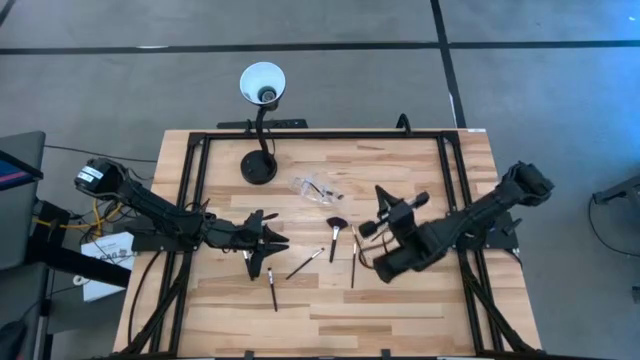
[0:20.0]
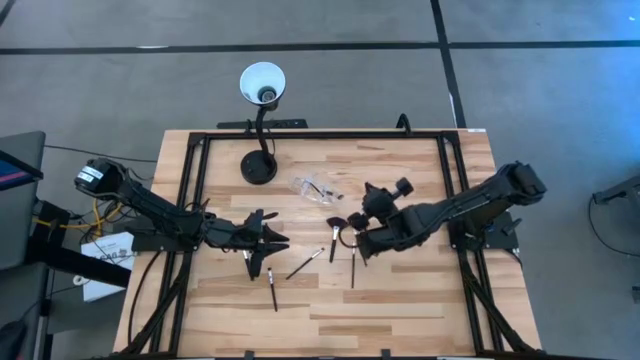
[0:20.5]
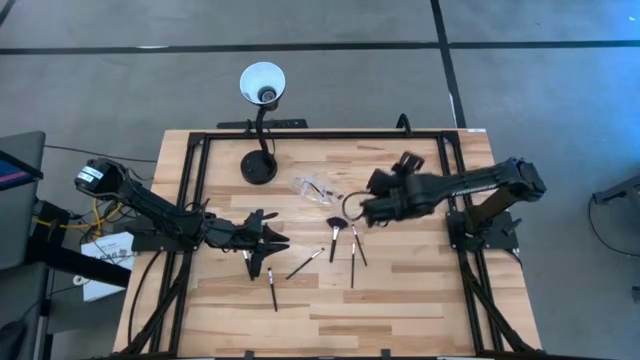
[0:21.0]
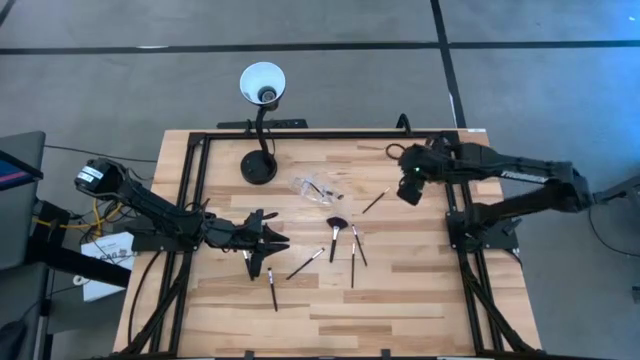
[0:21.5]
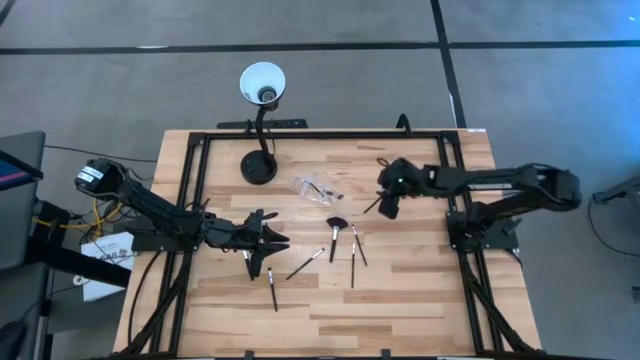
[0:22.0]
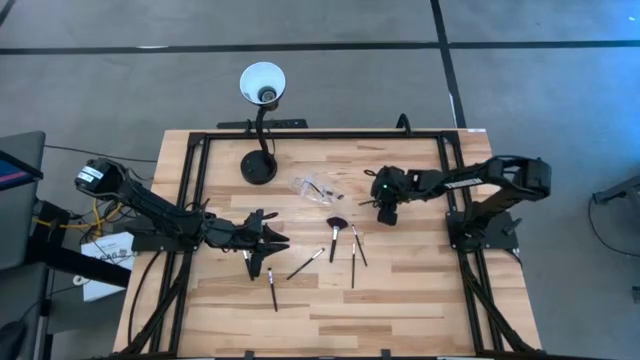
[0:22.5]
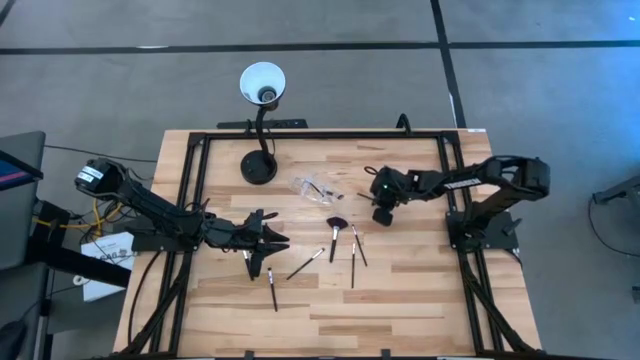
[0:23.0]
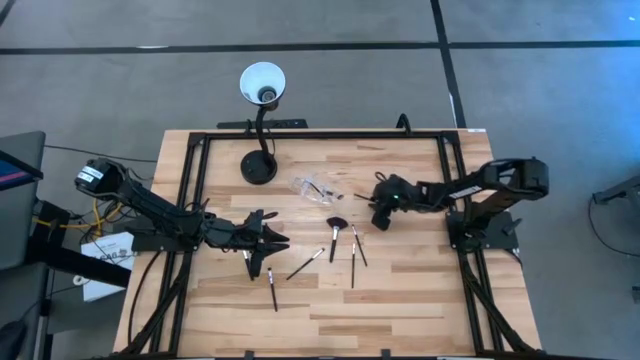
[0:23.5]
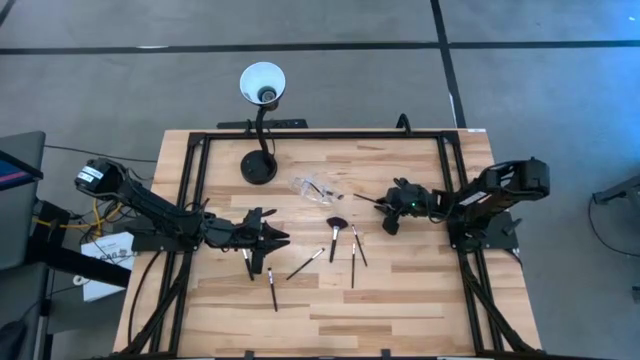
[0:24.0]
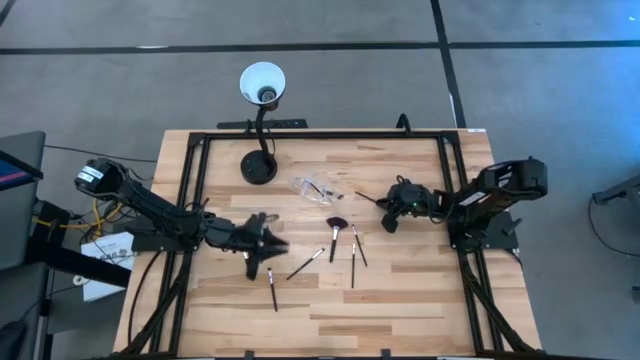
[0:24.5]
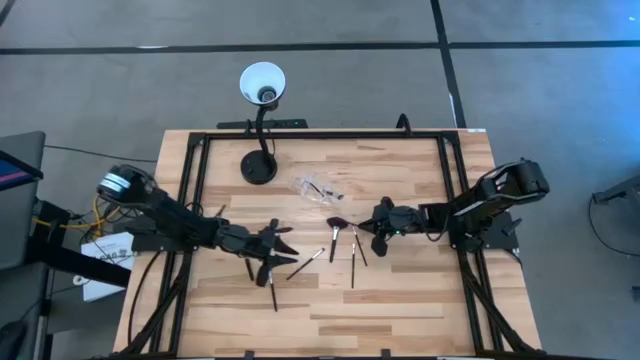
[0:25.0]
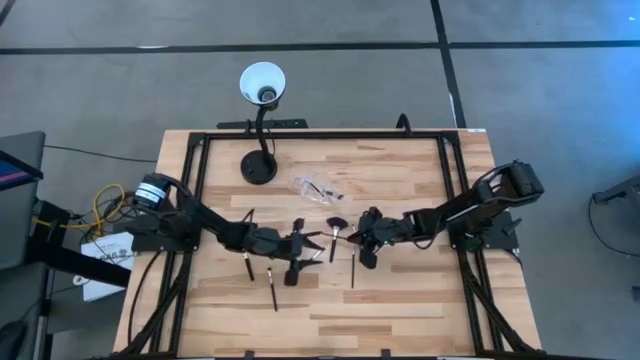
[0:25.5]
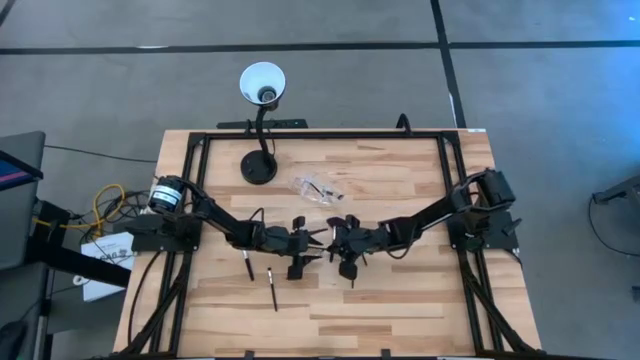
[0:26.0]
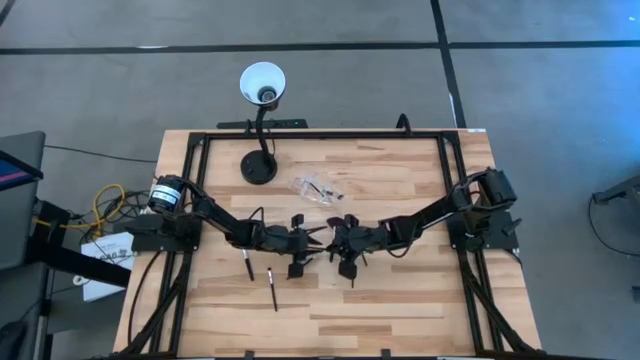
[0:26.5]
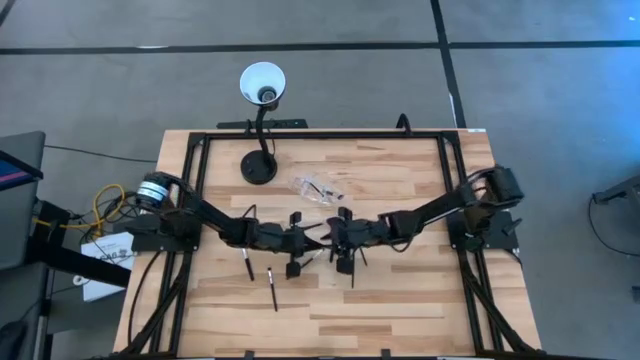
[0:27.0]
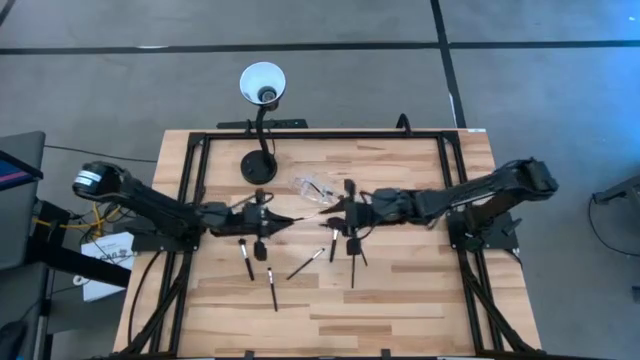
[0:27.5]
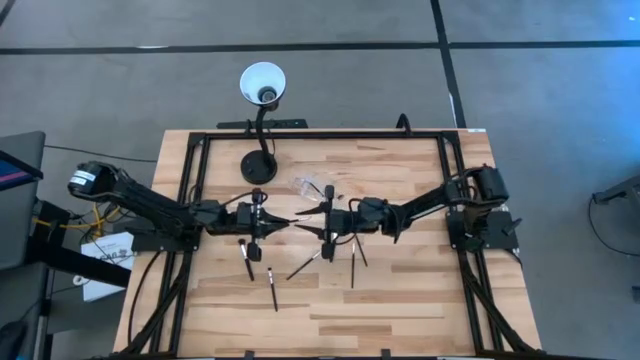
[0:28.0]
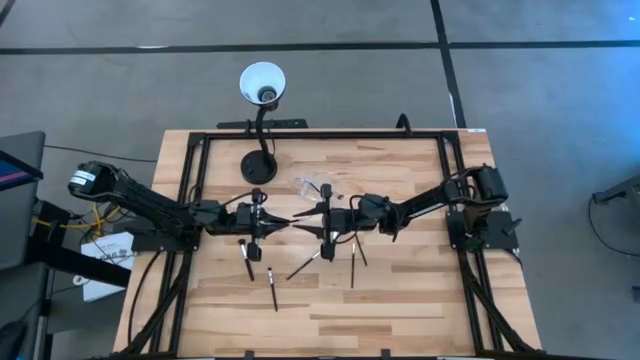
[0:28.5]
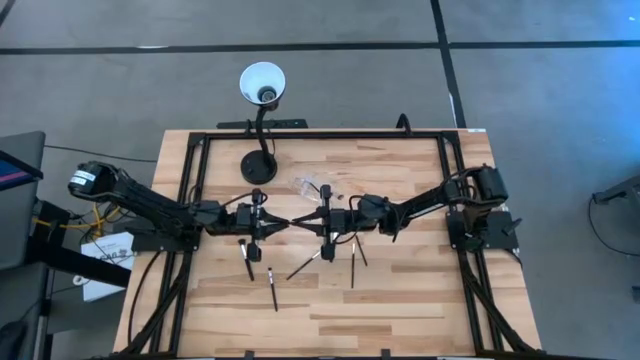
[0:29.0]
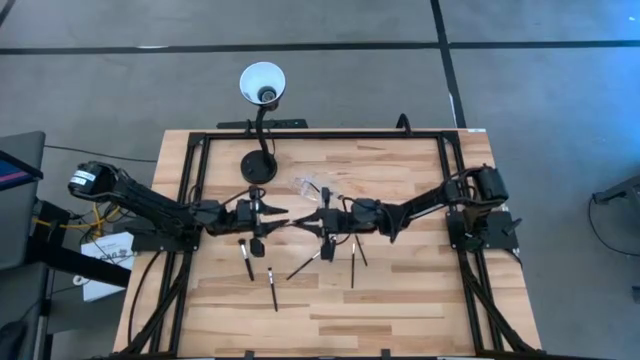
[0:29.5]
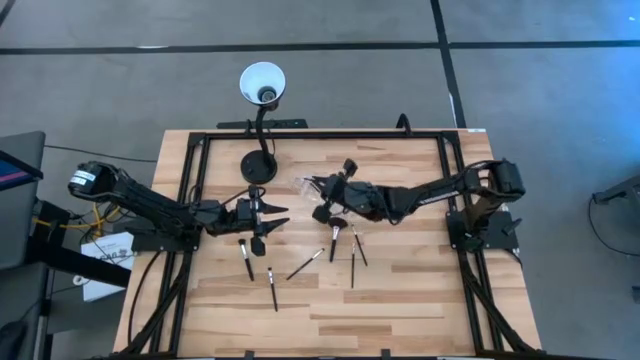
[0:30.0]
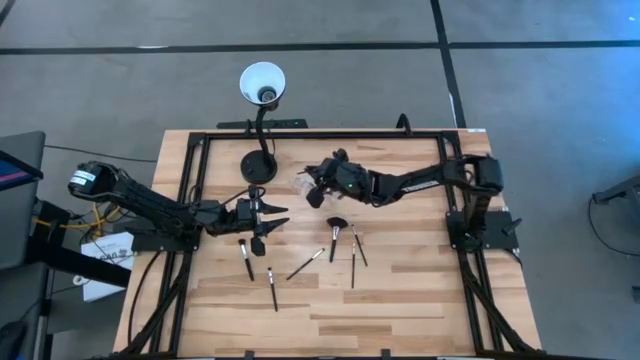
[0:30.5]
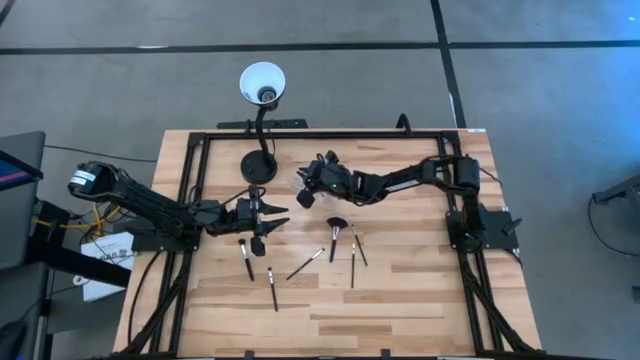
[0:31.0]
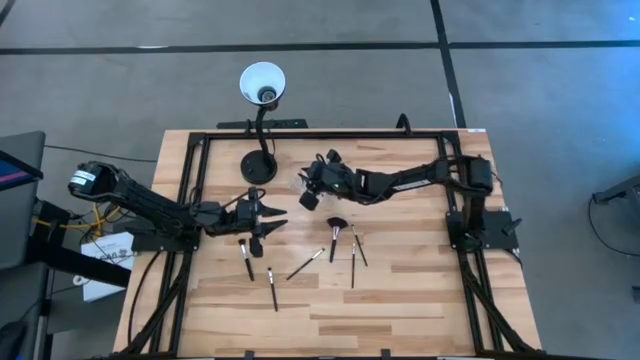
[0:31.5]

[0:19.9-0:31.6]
Task: Sort items
Put the eyeliner brush into the left section of the transparent organizer

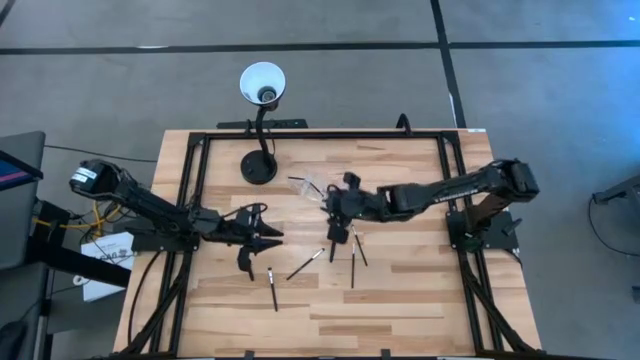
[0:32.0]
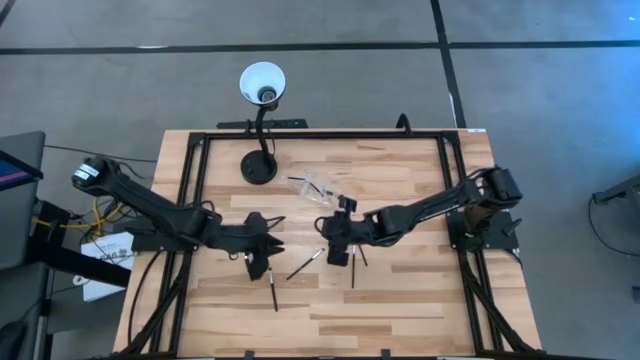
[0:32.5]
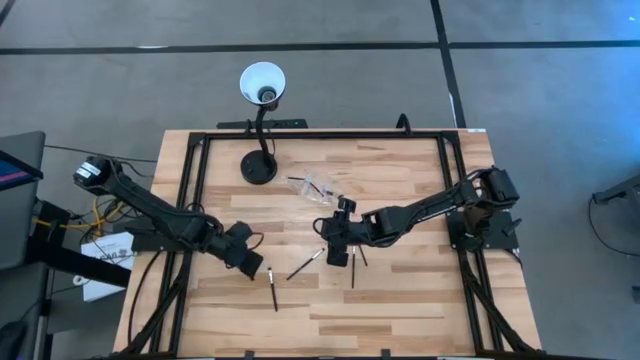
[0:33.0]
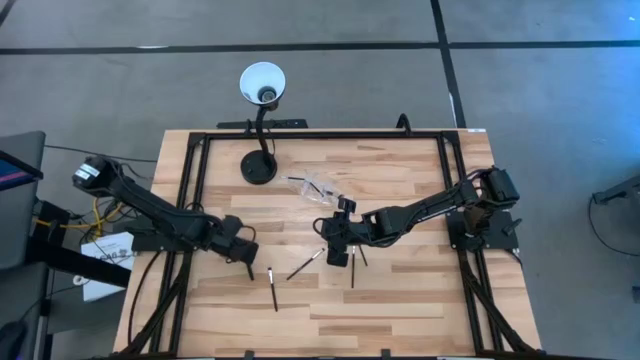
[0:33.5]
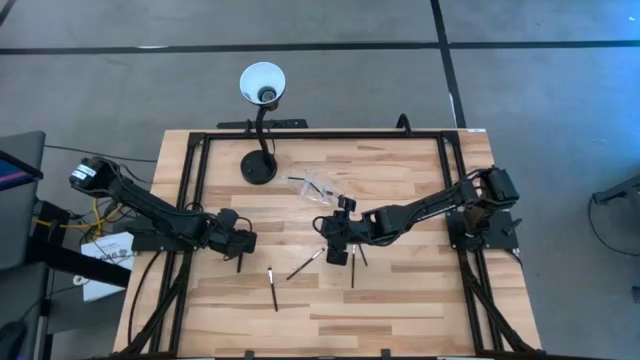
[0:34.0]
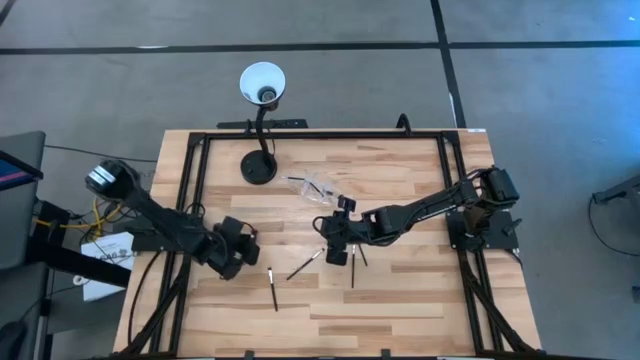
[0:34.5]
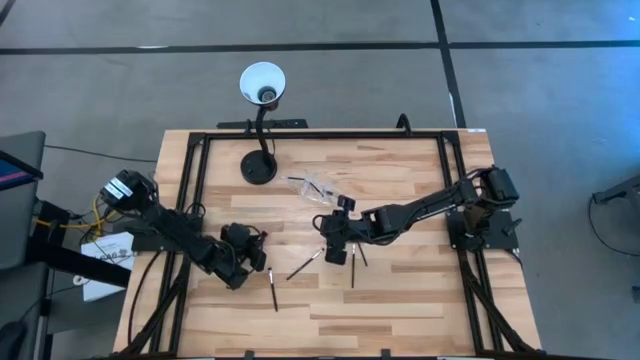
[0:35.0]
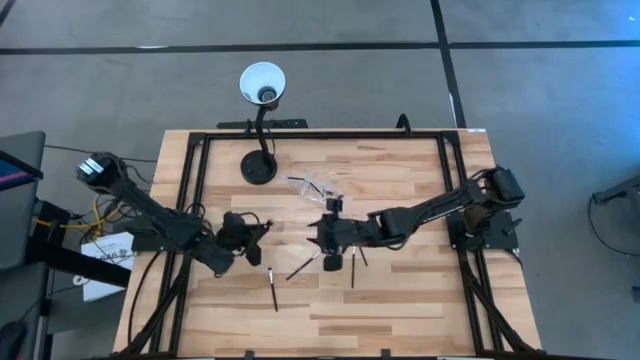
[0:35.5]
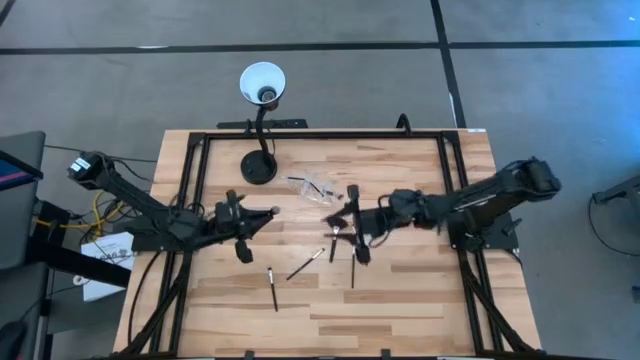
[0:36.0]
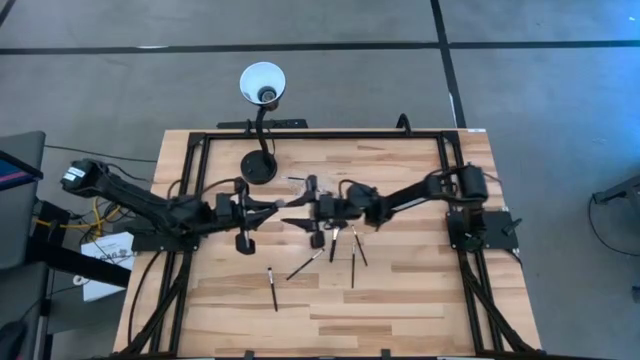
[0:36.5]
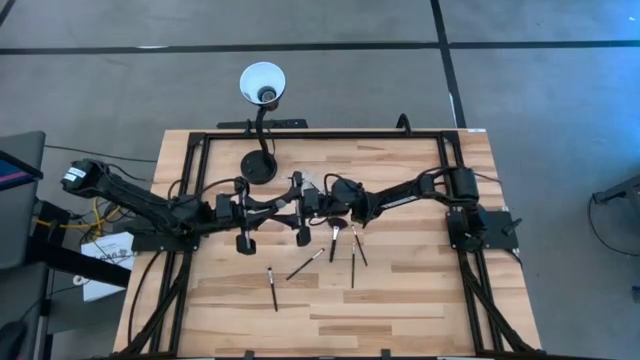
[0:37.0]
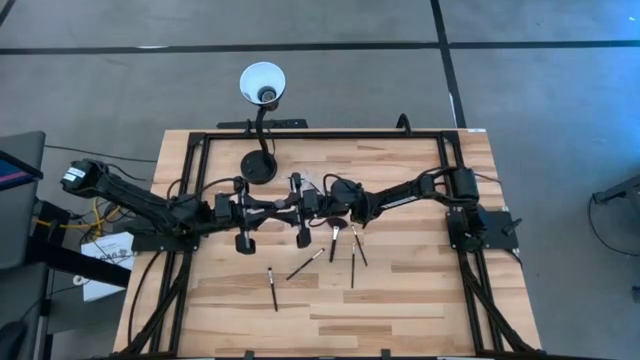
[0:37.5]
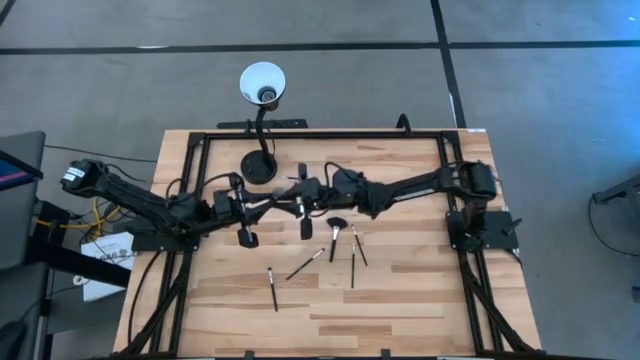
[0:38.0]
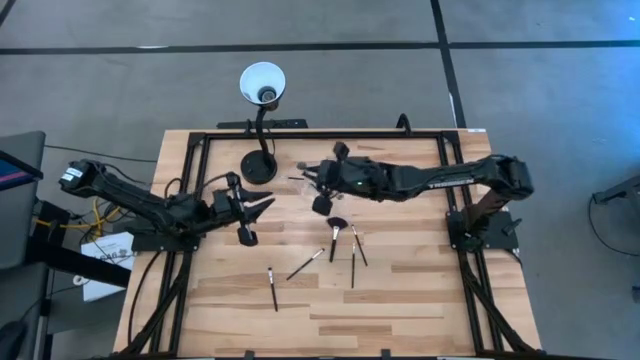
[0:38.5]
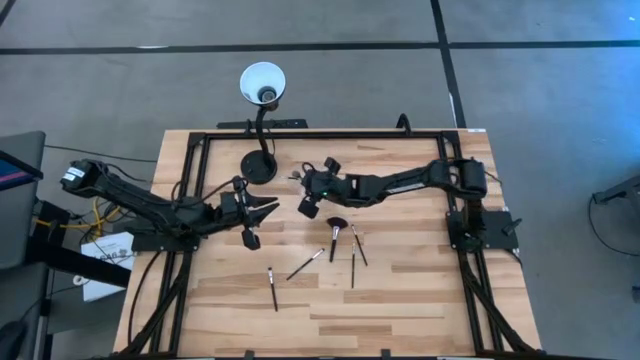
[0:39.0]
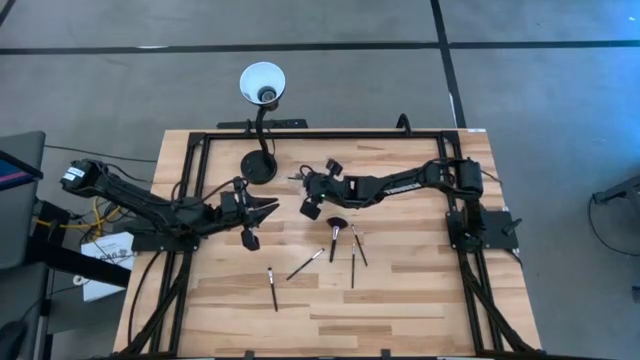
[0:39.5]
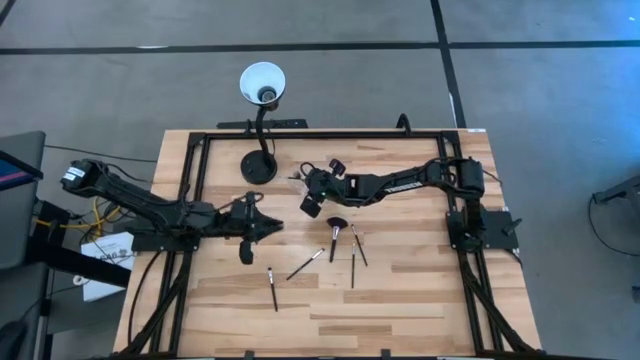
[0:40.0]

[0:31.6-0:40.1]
Put the powder brush into the middle section of the transparent organizer

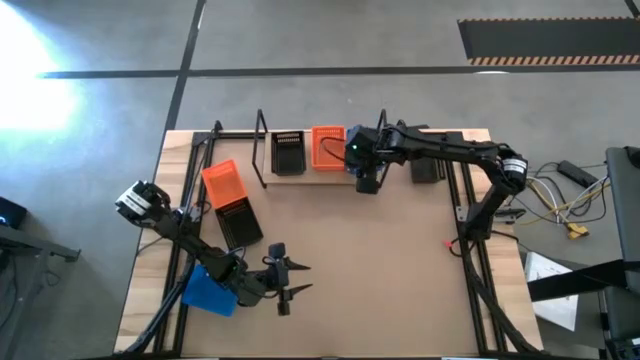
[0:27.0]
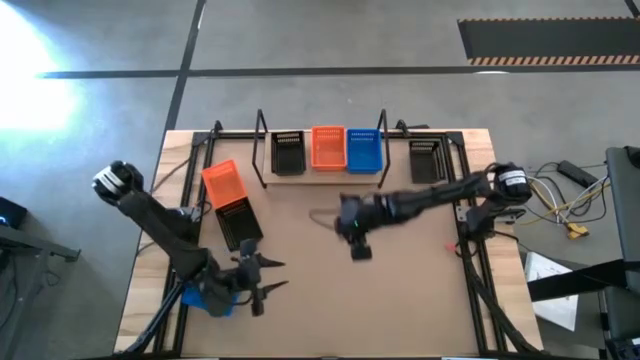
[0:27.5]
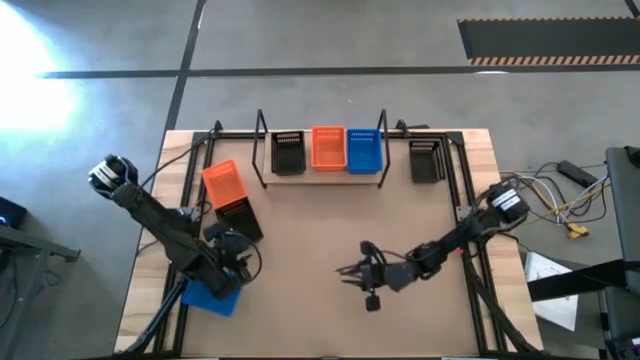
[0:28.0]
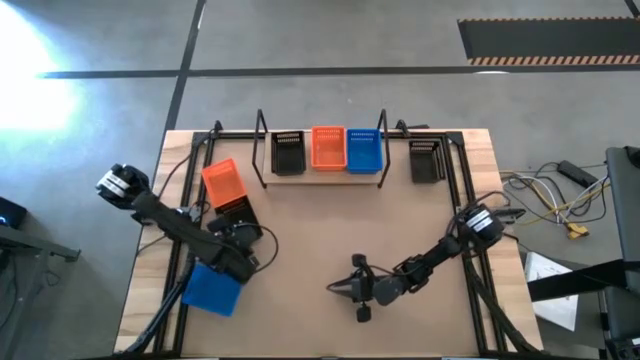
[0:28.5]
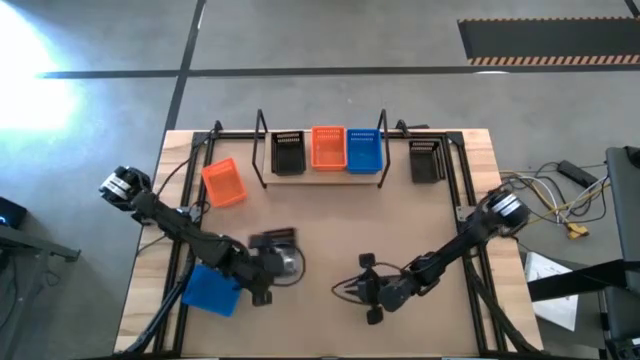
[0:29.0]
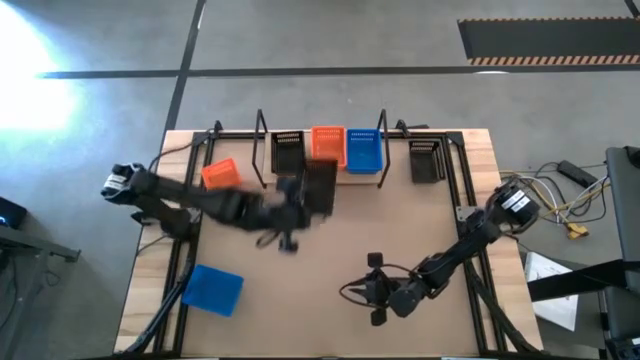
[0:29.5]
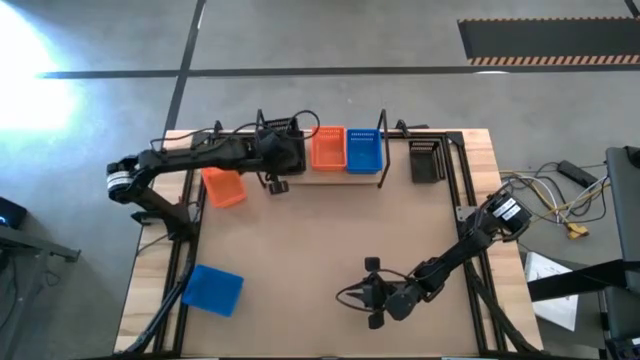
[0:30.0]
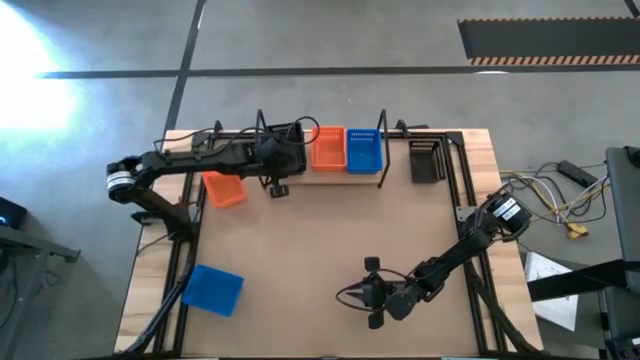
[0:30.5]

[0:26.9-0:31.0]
Task: Stack baskets on shelf by color
Stack the bottom black bin on the black bin on the shelf
